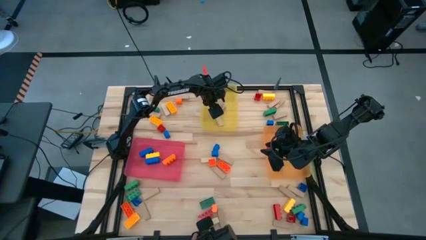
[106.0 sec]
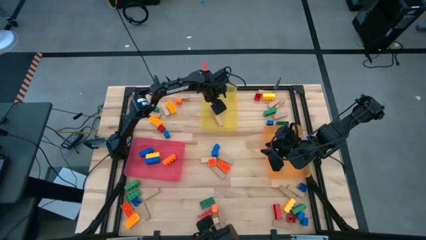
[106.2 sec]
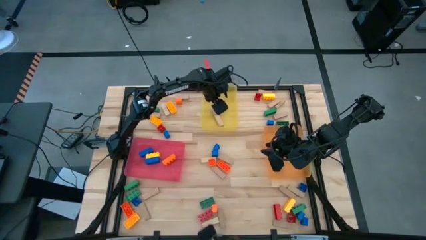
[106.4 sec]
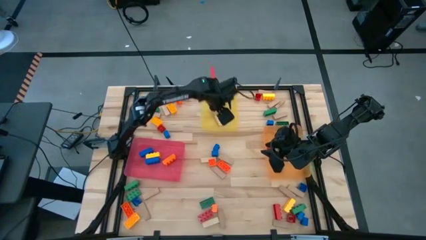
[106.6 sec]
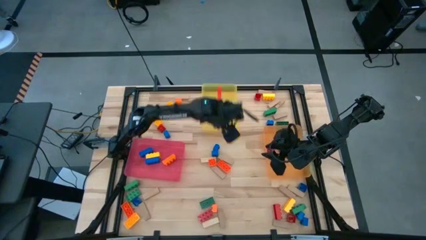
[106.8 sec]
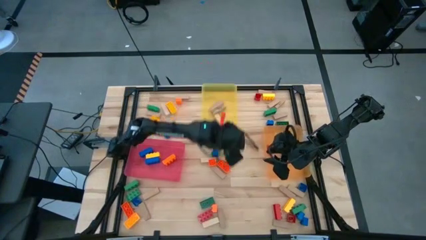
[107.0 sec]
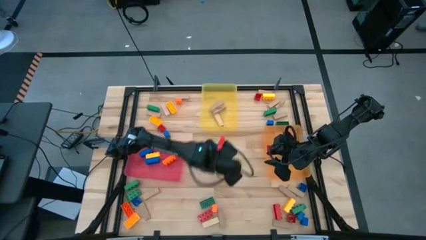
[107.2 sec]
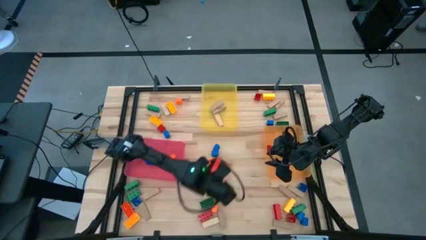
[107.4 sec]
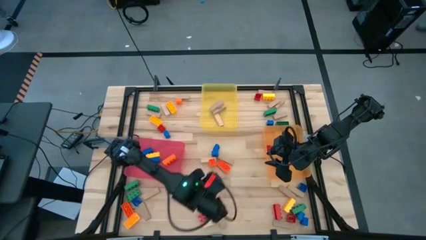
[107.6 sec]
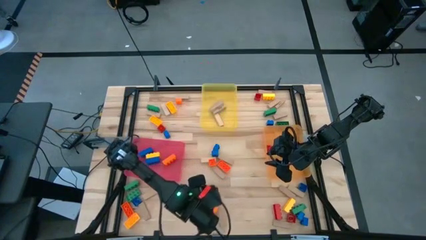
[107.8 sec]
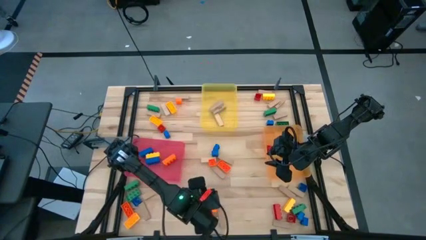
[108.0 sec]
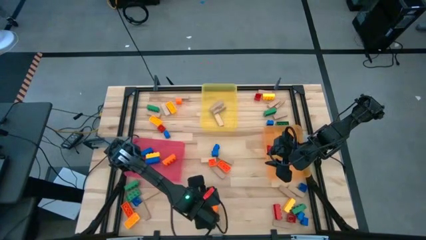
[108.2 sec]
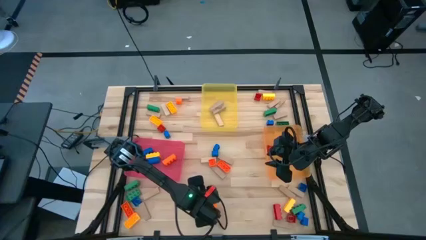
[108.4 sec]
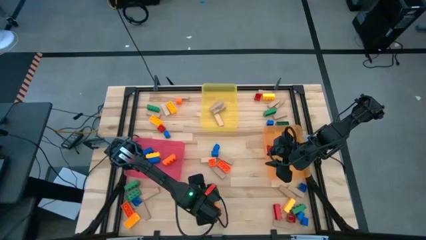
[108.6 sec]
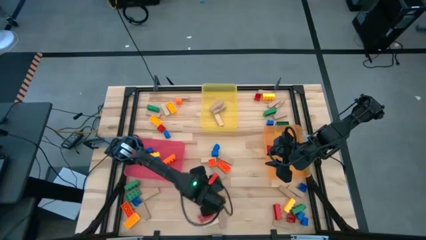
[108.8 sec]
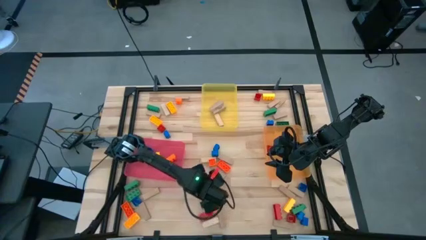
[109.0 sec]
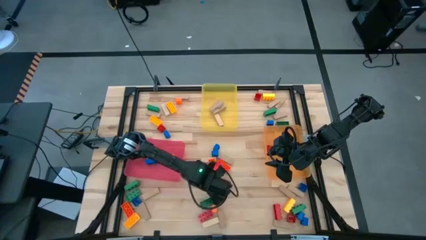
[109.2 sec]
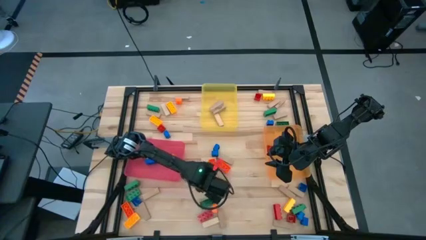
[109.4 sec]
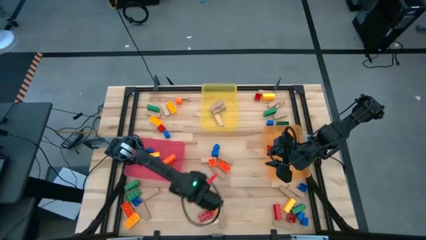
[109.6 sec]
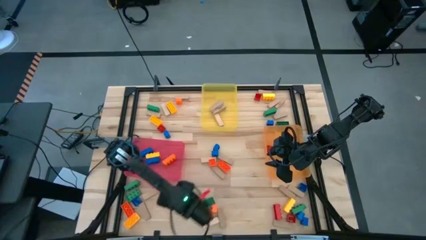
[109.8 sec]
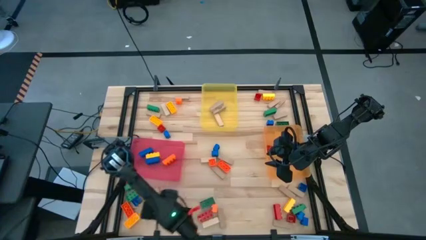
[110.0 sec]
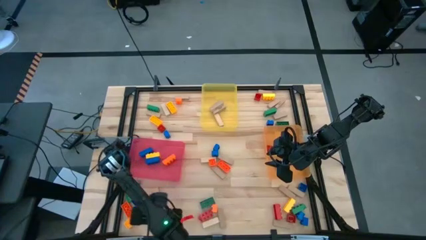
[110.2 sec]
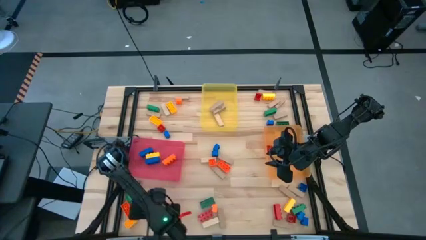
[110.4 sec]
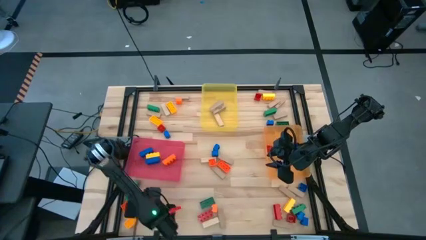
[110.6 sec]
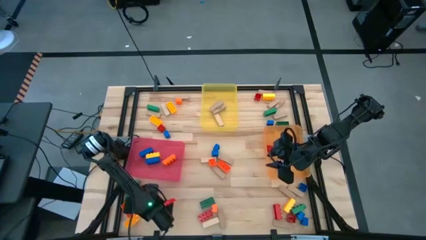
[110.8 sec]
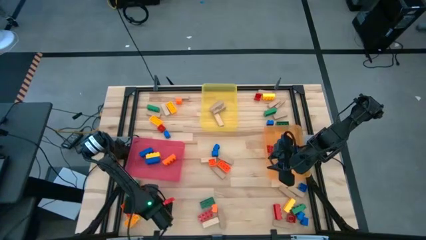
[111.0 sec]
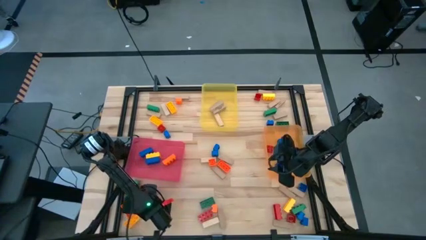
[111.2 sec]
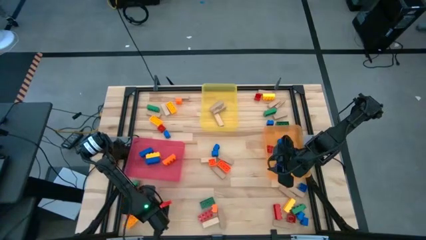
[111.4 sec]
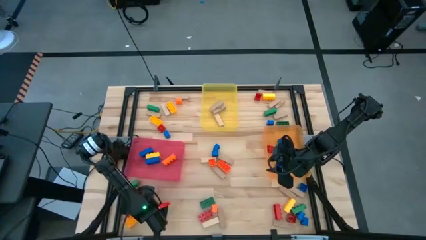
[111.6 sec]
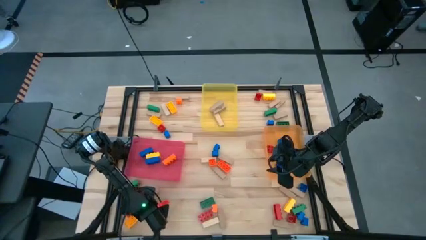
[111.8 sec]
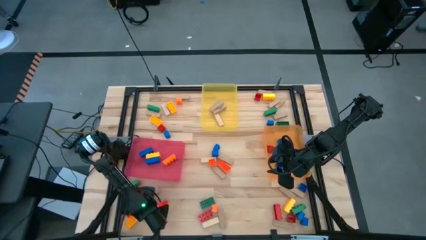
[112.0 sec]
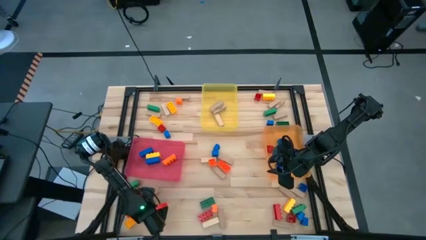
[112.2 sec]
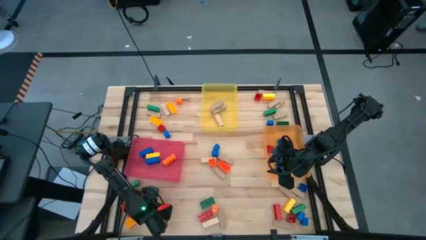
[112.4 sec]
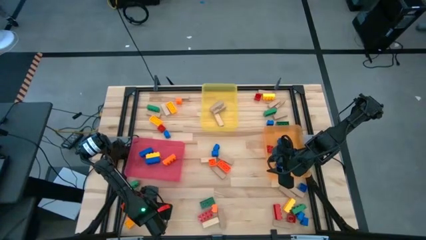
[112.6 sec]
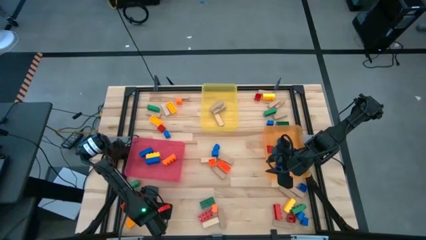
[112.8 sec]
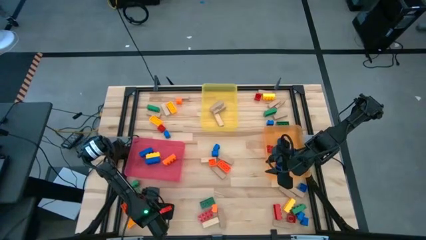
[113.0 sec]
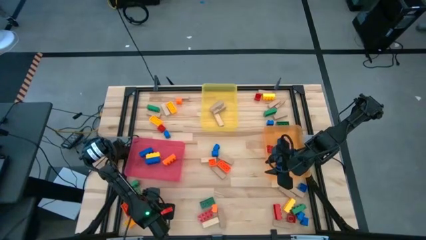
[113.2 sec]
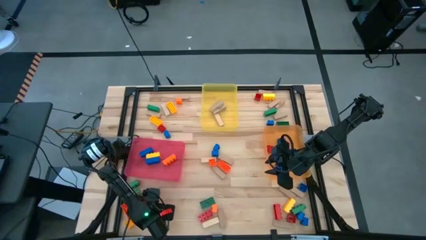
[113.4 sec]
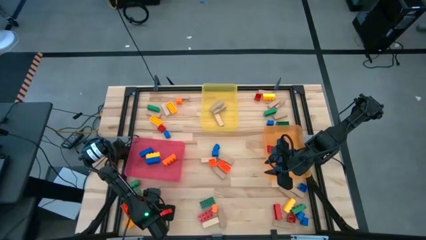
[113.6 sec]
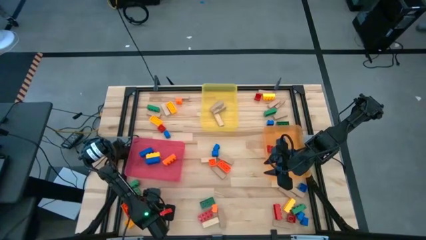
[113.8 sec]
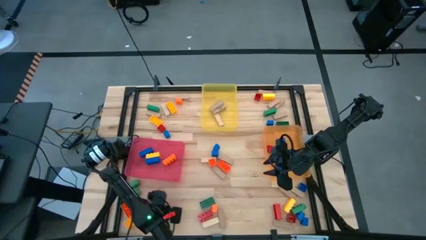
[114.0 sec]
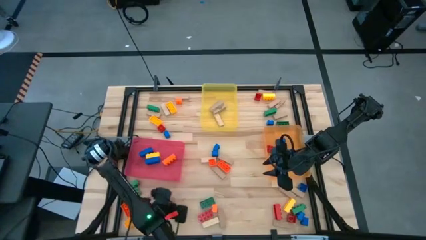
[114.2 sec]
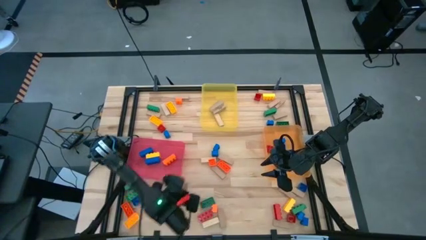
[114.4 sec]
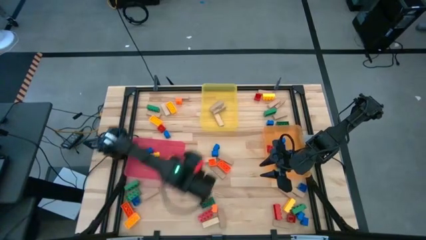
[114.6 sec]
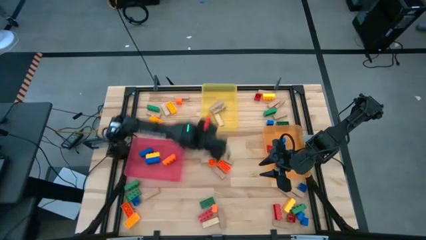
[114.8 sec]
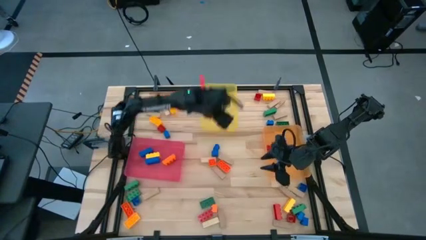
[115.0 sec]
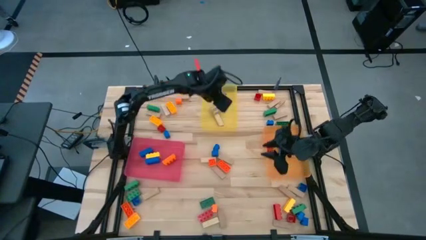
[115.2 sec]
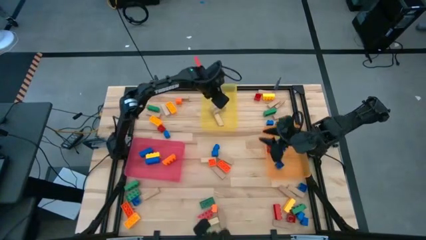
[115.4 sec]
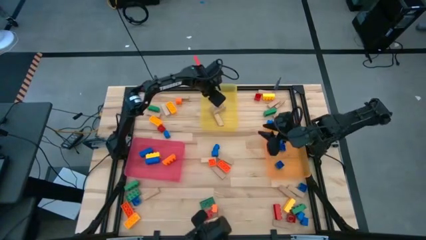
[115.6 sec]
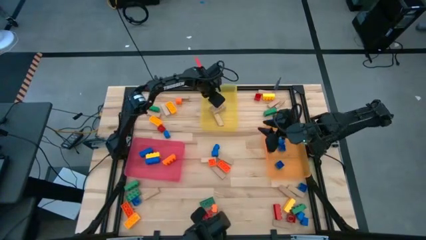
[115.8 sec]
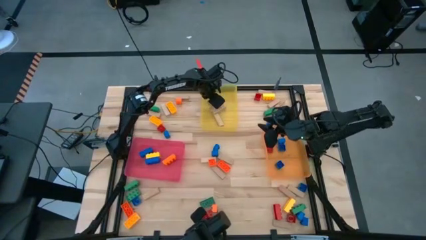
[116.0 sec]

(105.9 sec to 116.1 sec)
Task: Sort blocks by size
Put the wooden block into the yellow bin
